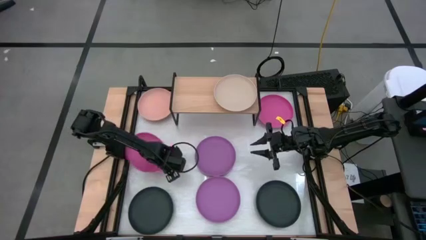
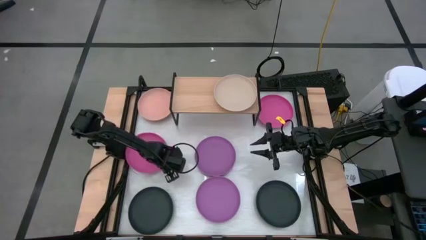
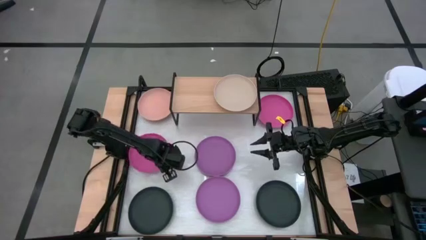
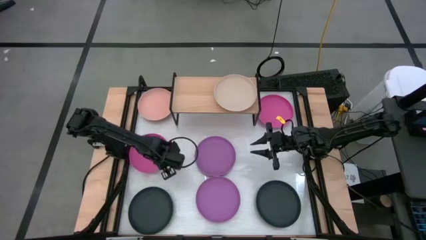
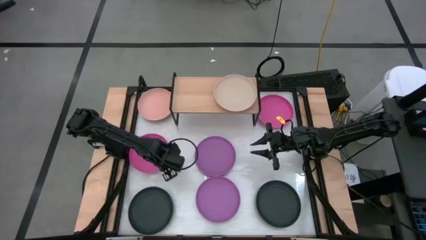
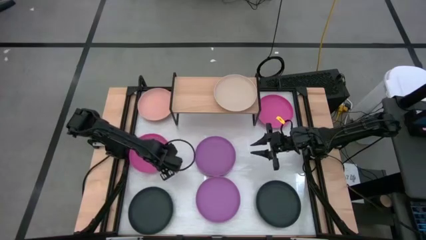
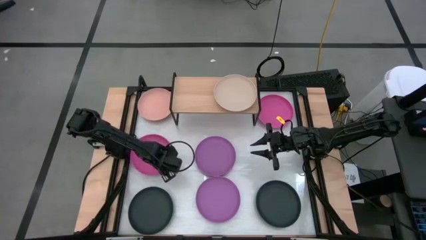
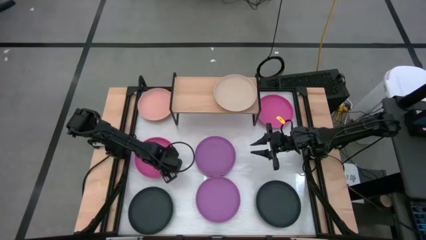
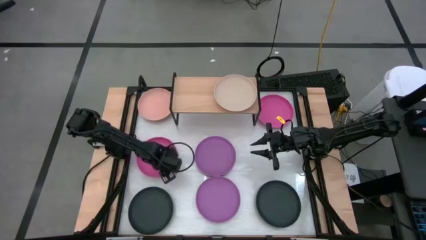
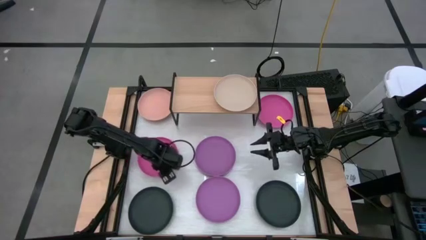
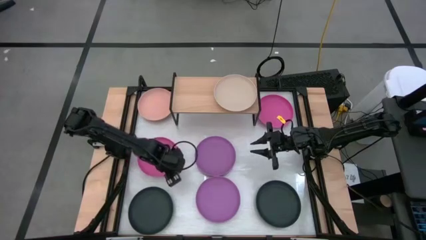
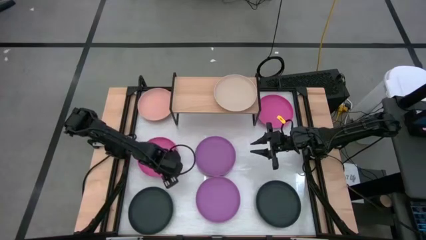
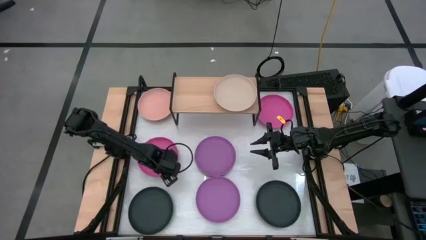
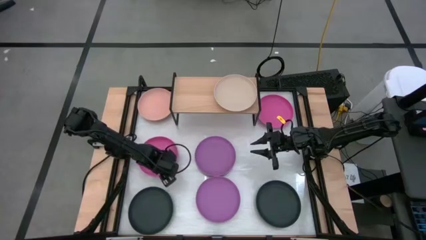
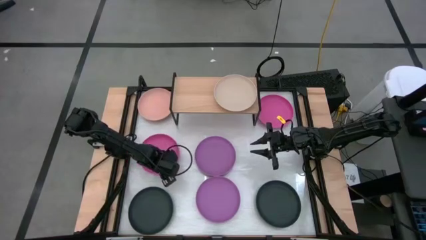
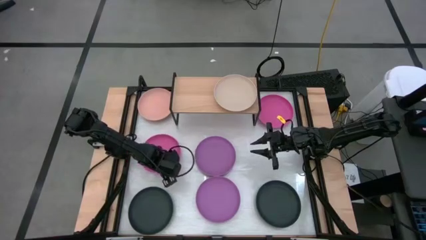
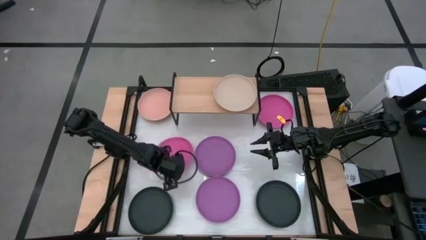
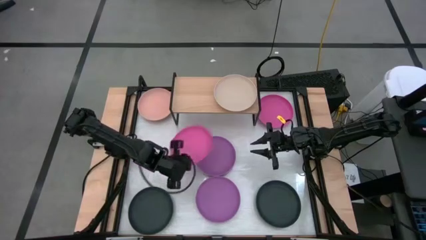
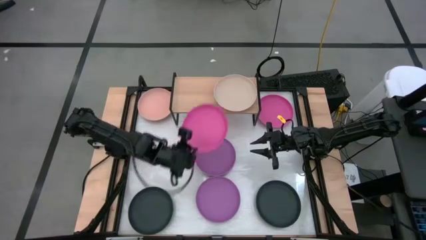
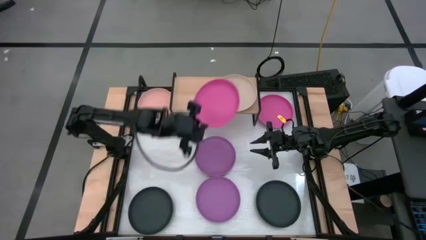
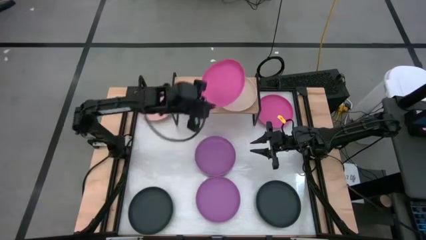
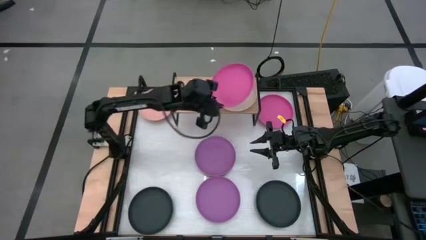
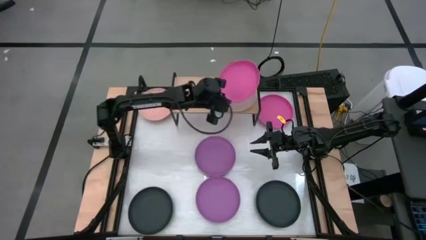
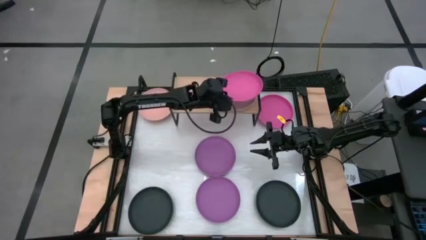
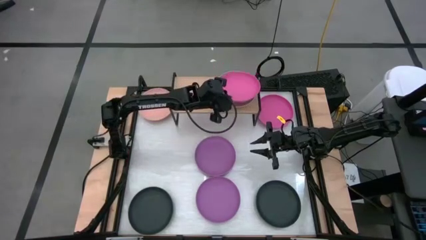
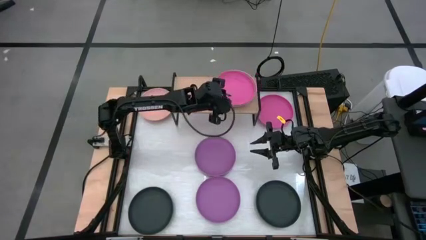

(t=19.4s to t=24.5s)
Task: Place and stack plates onto a shelf
Stack the left pink plate on top of the brown plate on the shelf

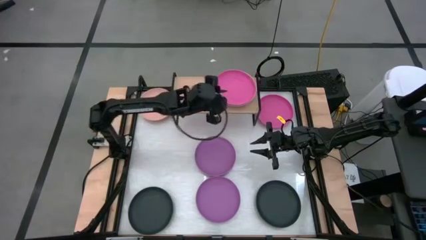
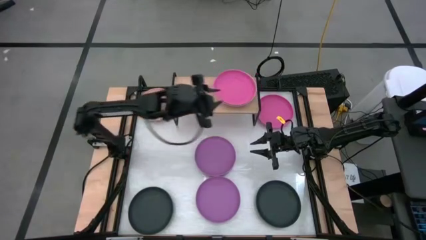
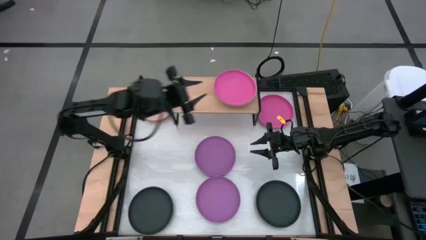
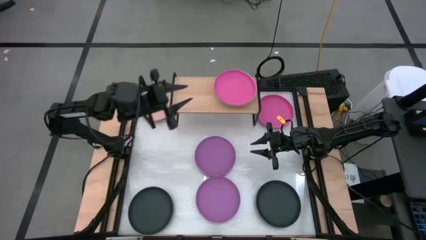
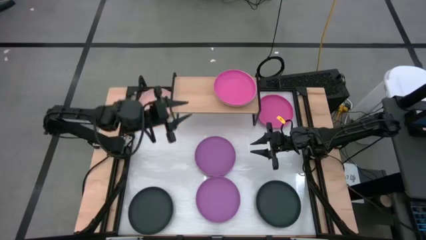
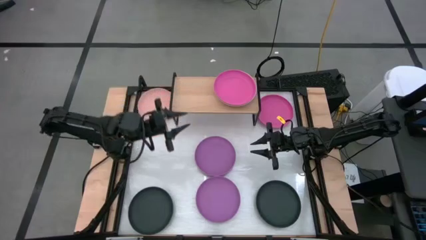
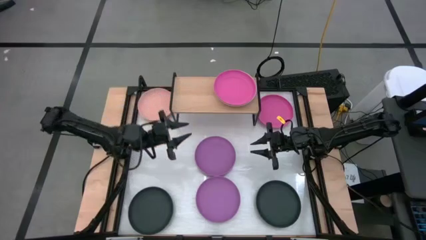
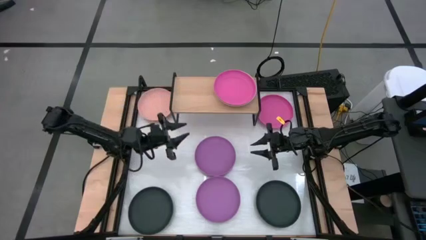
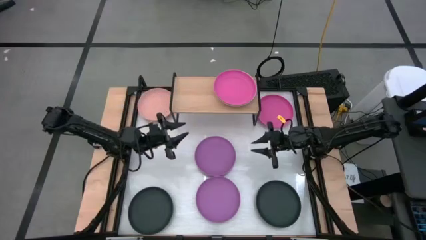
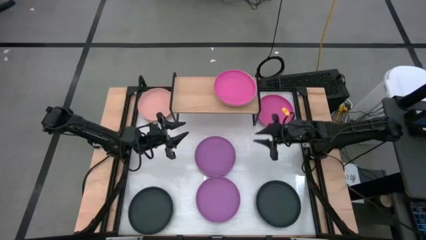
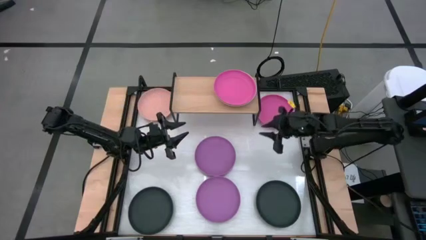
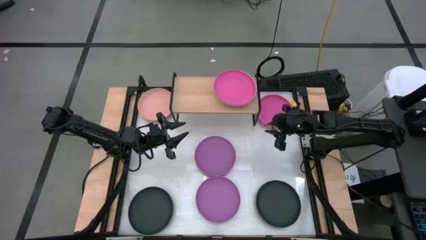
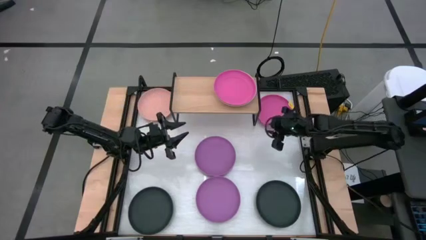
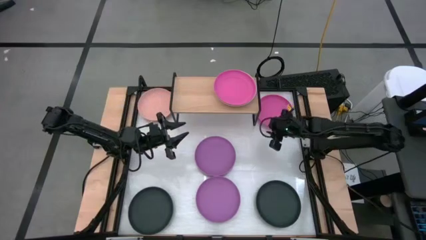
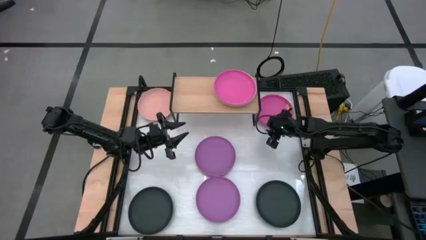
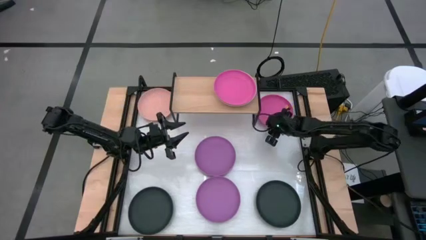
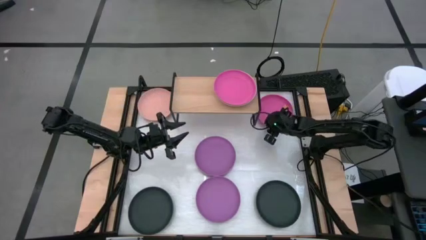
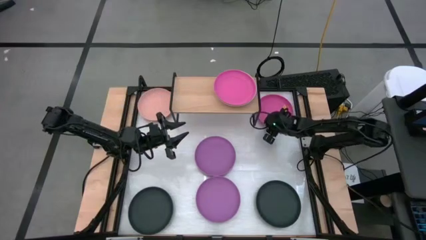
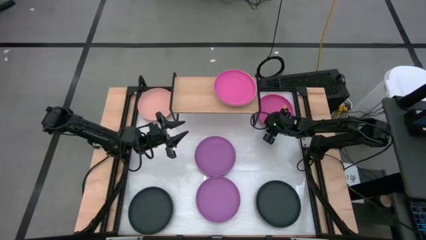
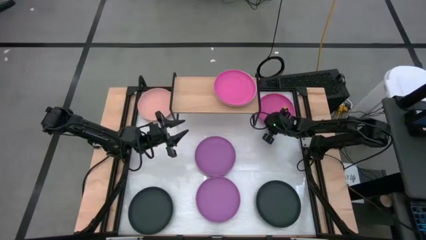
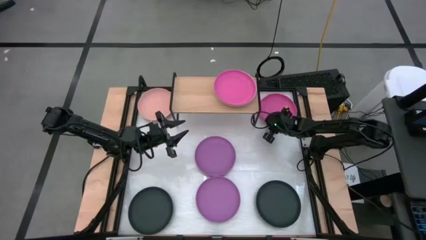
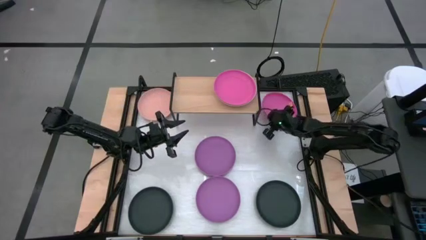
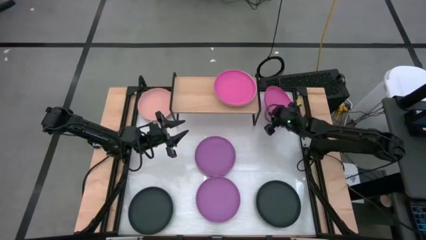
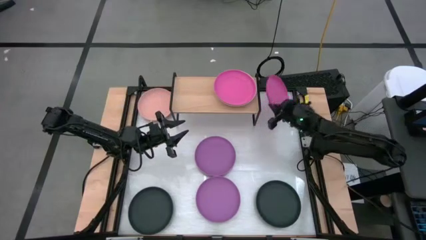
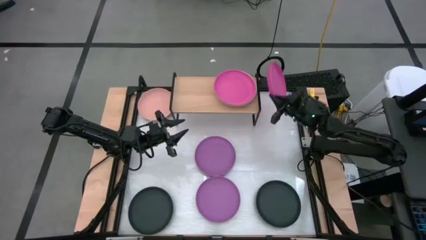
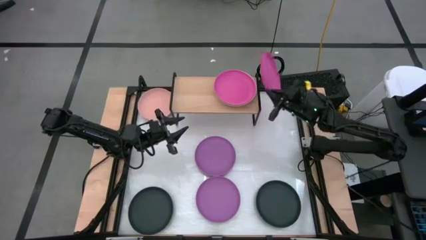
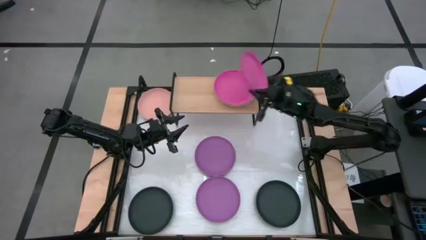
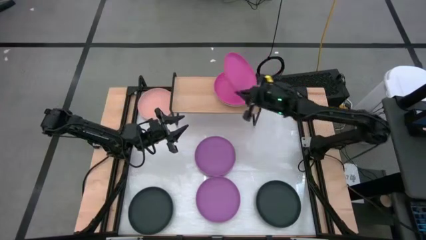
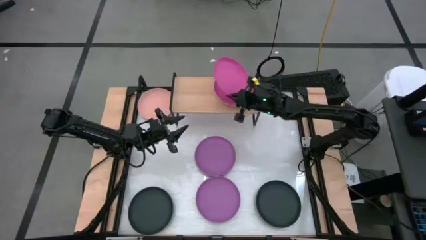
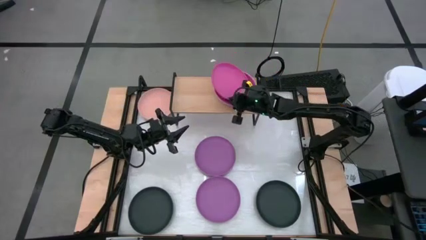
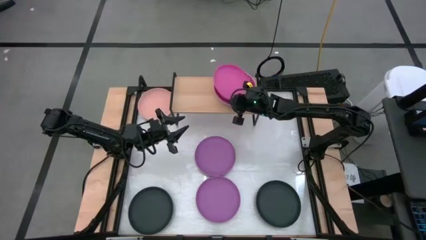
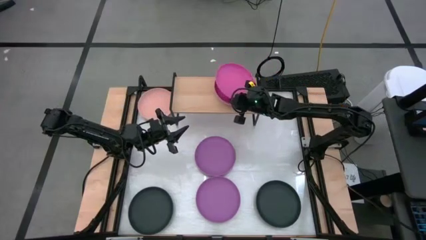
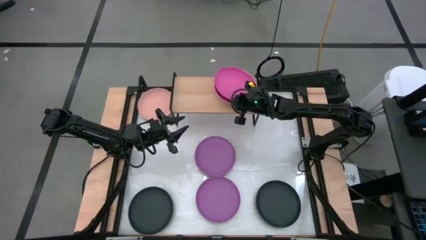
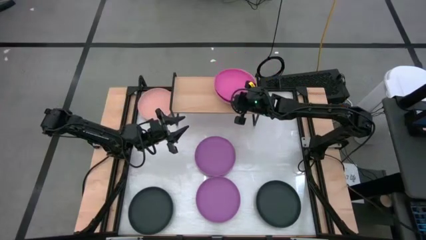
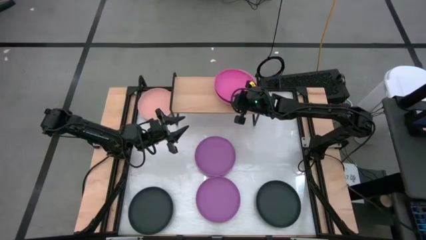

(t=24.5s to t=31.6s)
Stack the pink plate on top of the pink plate on the shelf

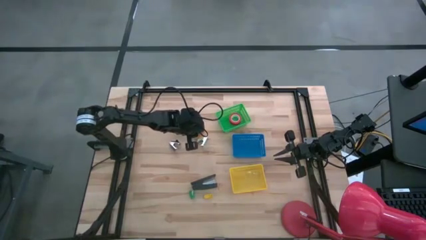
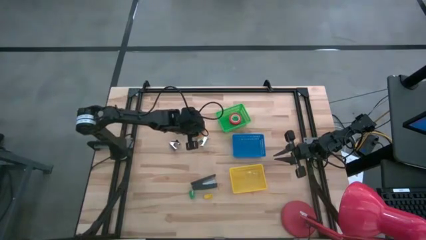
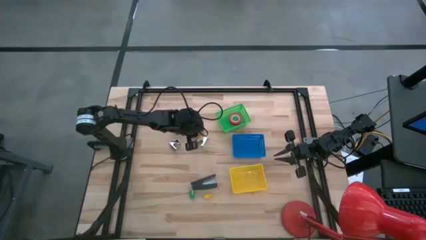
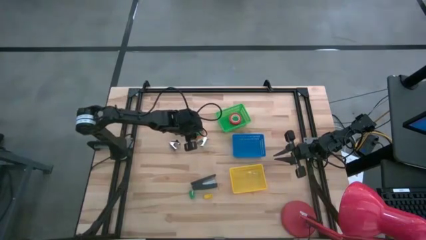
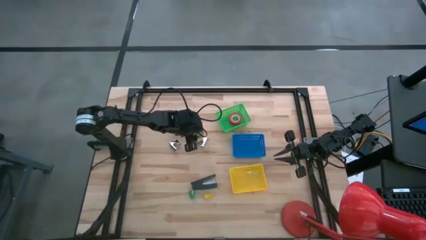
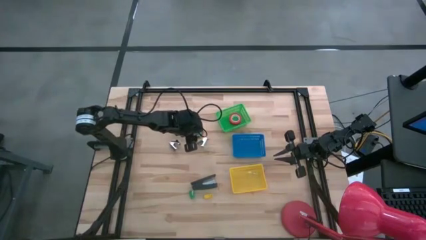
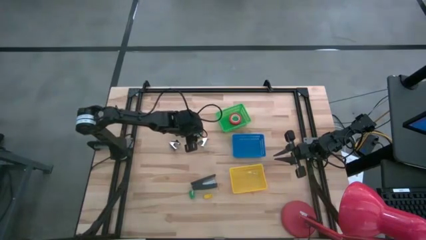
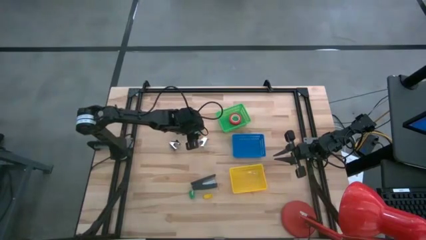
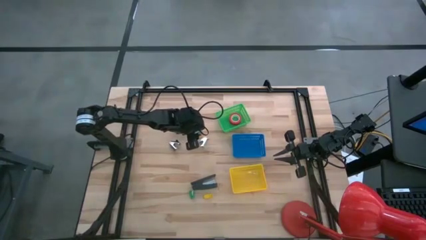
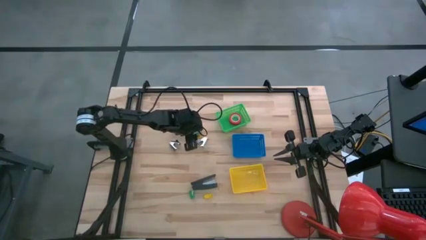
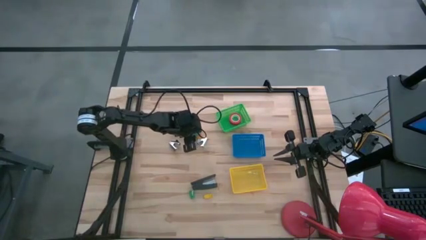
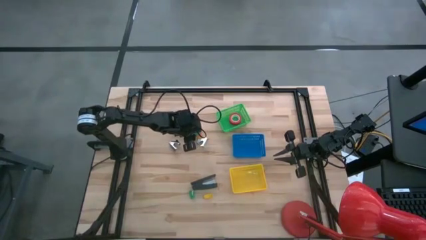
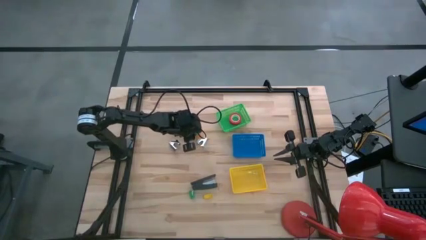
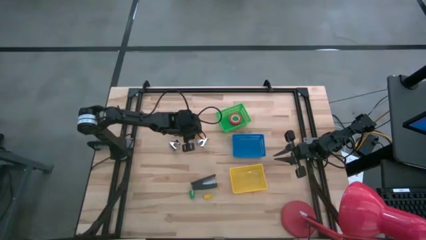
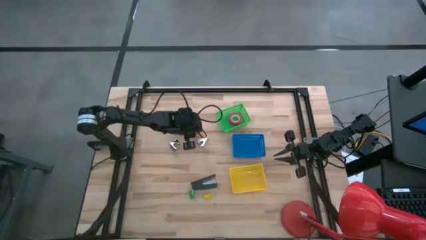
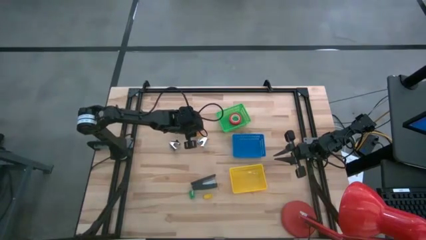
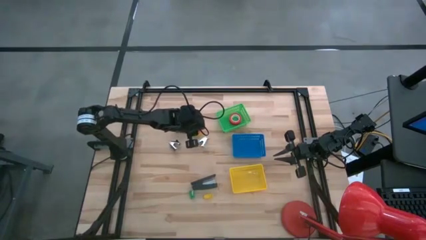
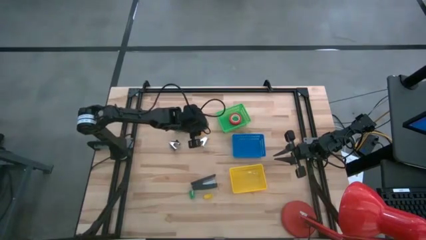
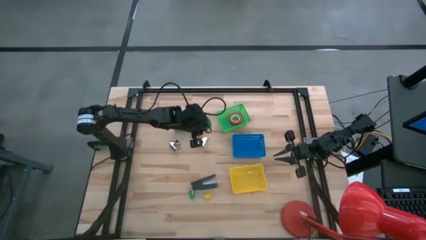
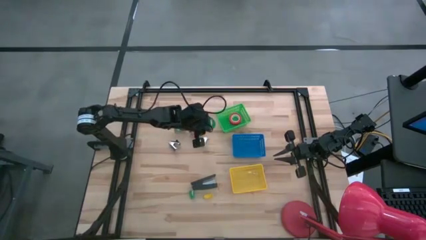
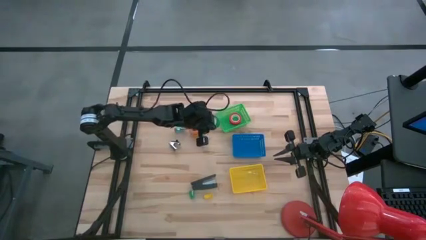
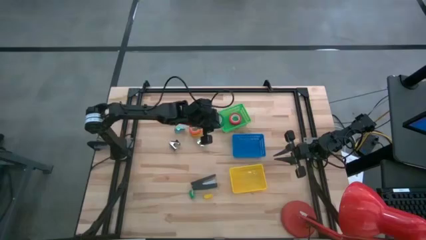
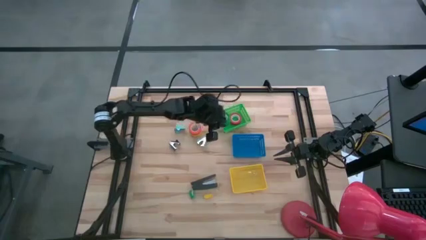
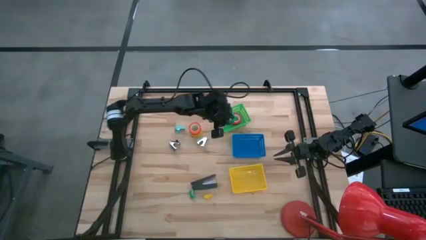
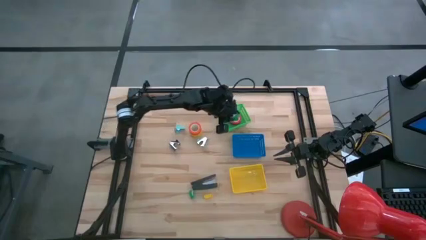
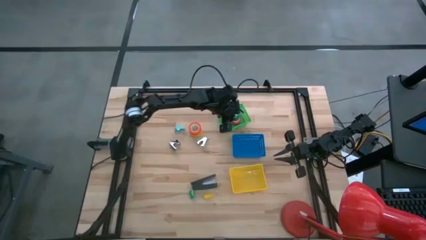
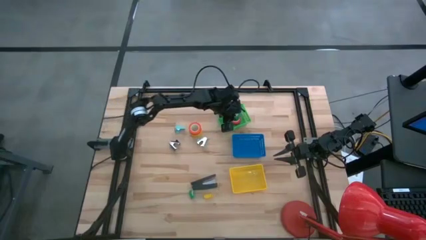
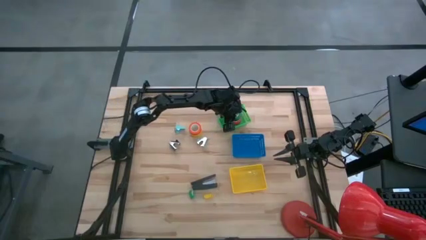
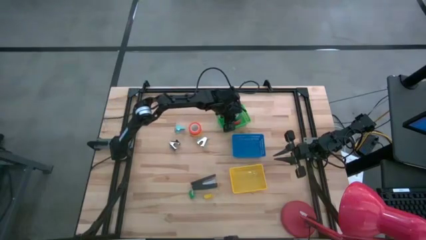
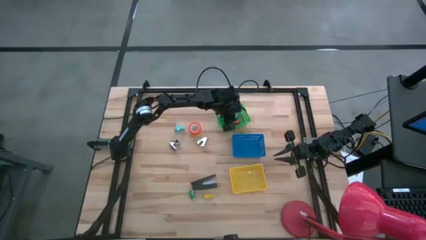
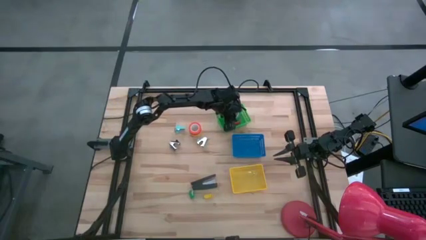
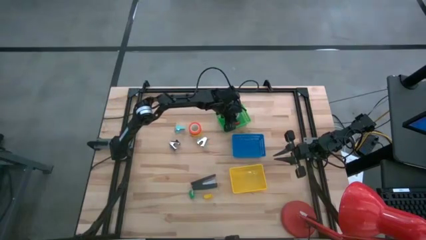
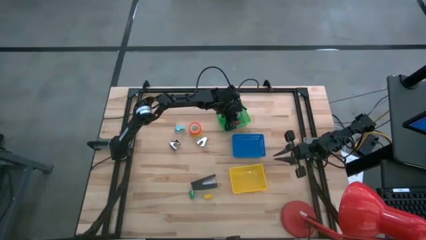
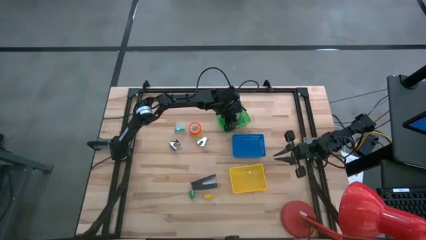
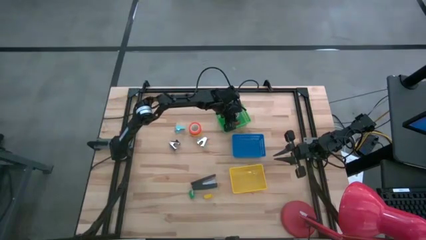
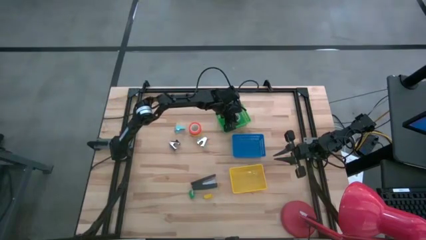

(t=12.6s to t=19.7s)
Task: Pick and place Stapler, Stapler remover, tape
Put the green tape into the red bin
